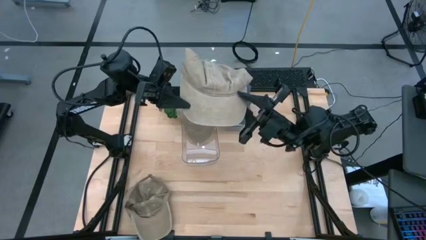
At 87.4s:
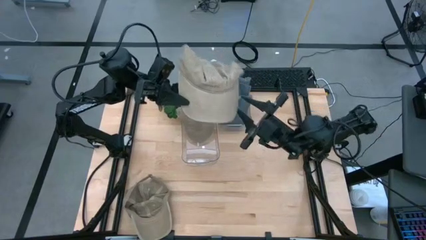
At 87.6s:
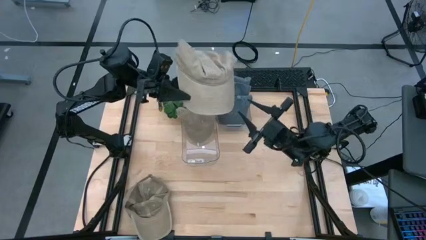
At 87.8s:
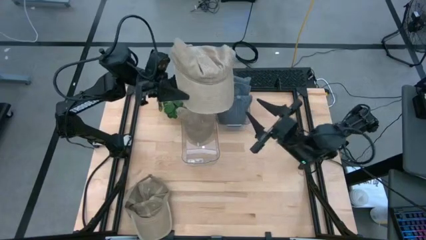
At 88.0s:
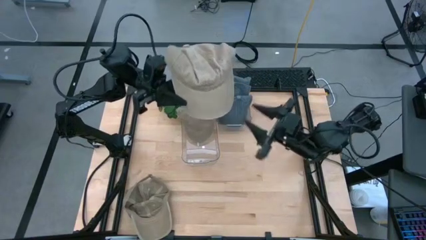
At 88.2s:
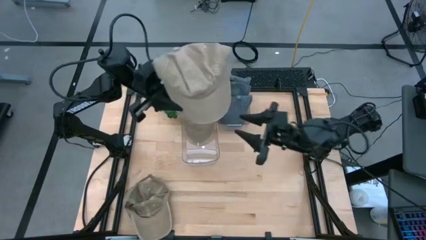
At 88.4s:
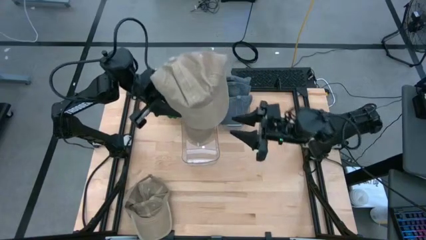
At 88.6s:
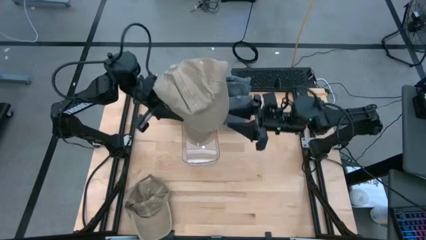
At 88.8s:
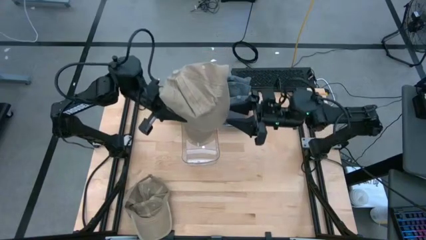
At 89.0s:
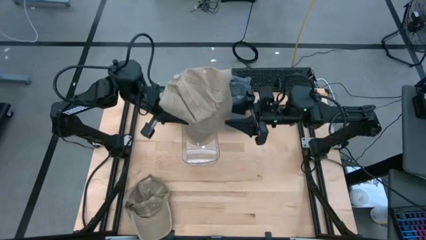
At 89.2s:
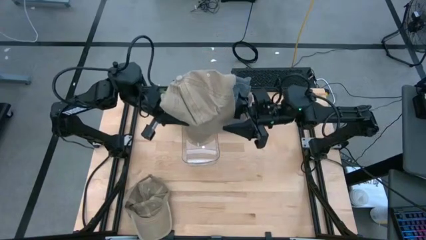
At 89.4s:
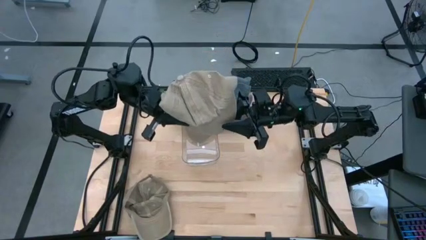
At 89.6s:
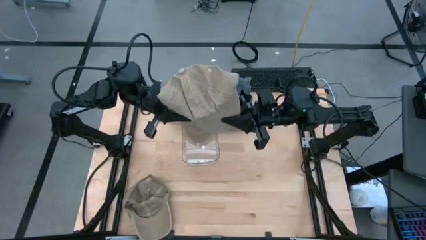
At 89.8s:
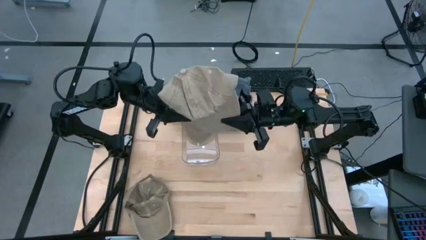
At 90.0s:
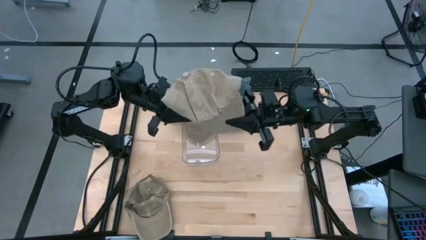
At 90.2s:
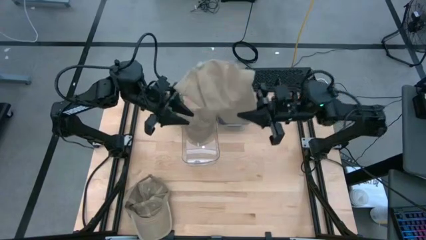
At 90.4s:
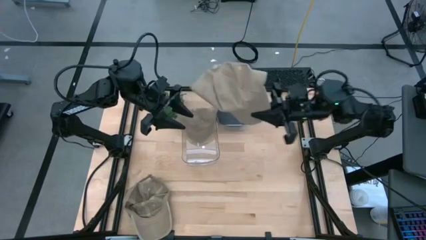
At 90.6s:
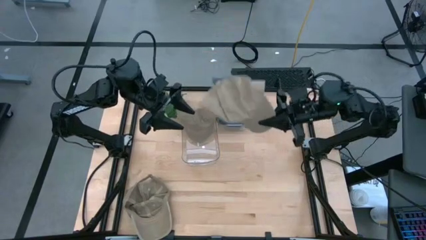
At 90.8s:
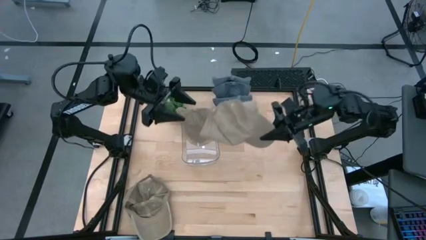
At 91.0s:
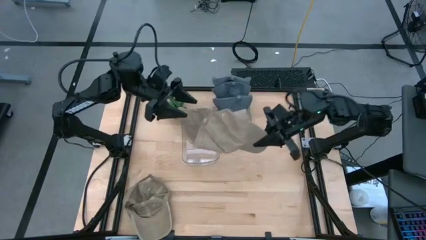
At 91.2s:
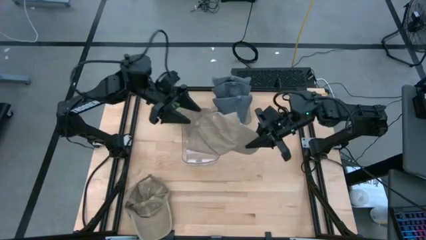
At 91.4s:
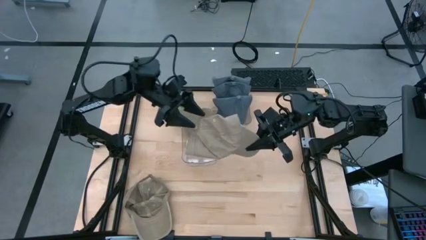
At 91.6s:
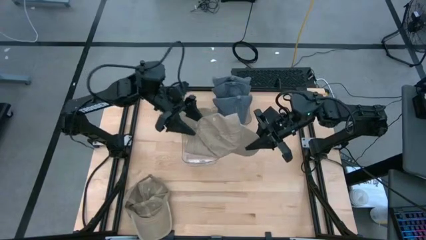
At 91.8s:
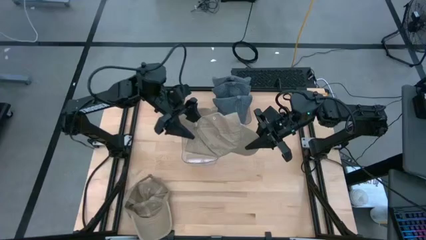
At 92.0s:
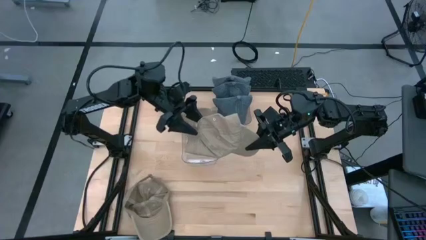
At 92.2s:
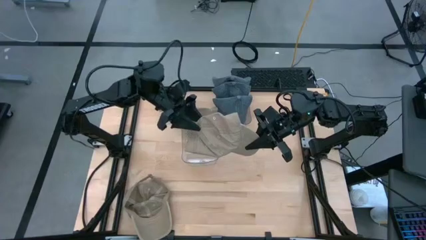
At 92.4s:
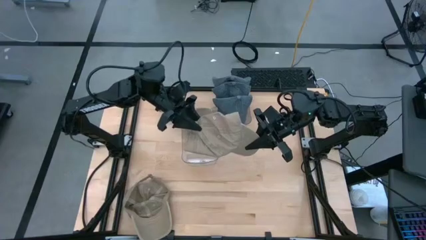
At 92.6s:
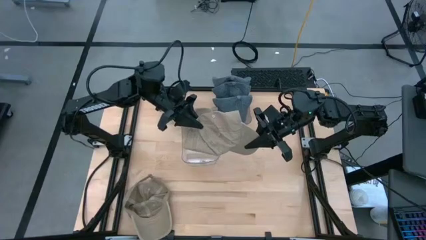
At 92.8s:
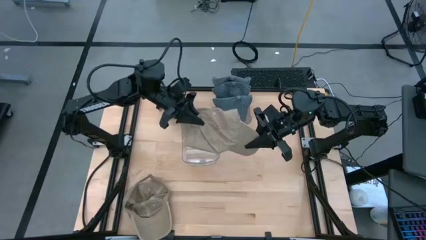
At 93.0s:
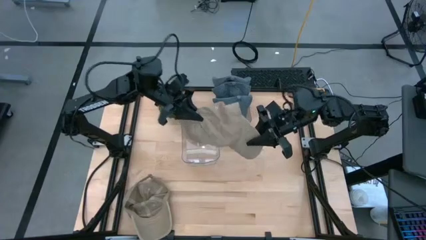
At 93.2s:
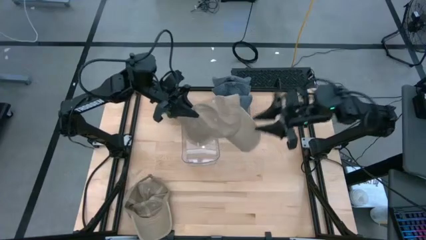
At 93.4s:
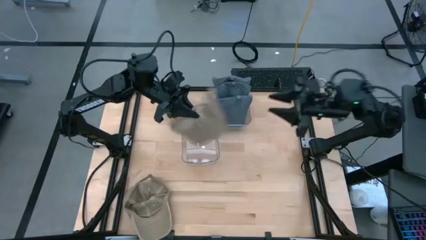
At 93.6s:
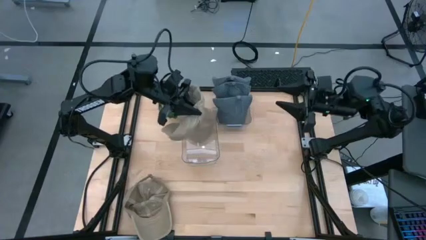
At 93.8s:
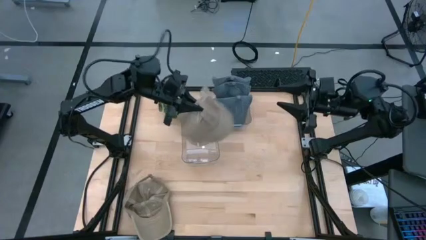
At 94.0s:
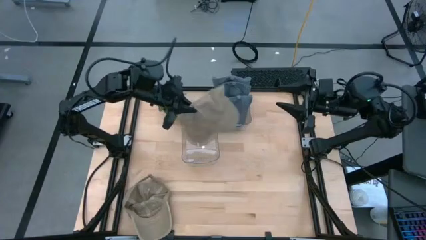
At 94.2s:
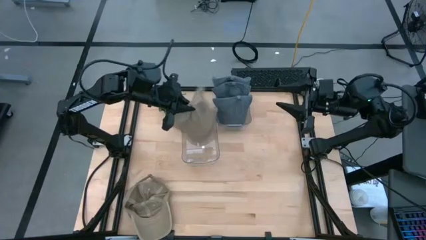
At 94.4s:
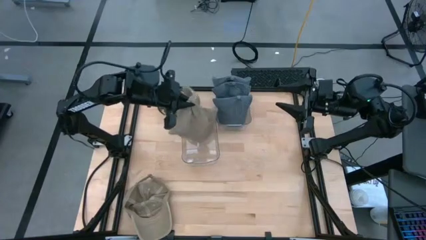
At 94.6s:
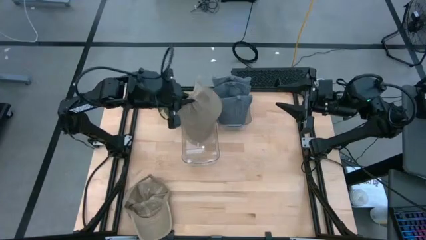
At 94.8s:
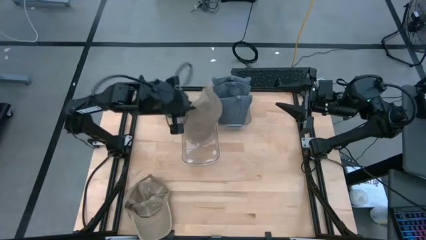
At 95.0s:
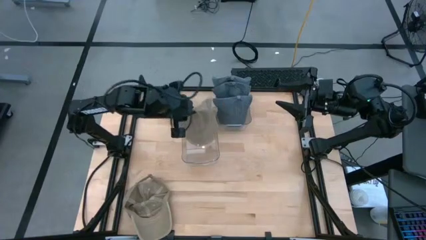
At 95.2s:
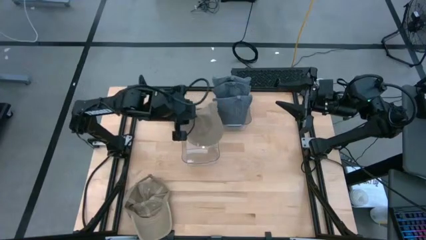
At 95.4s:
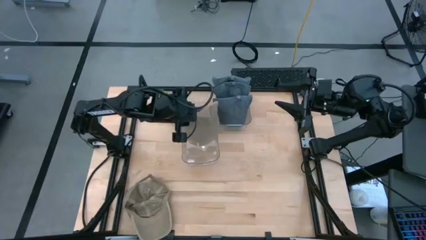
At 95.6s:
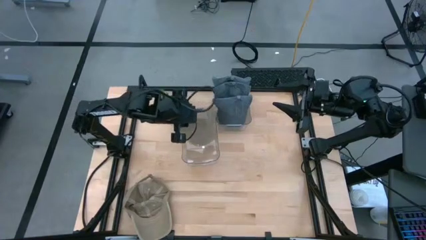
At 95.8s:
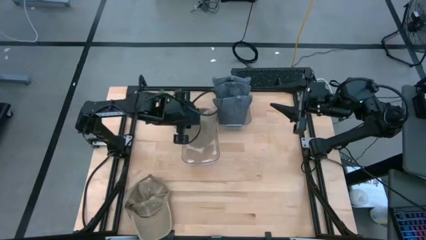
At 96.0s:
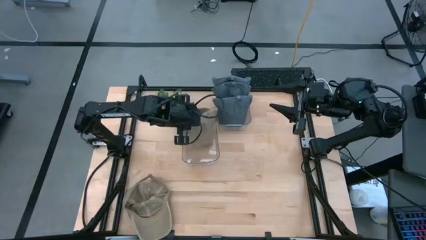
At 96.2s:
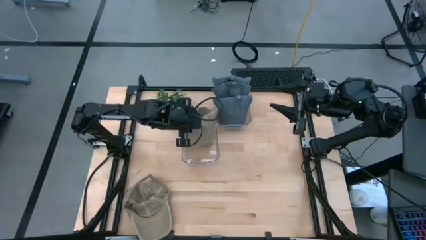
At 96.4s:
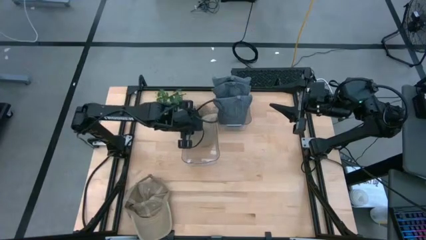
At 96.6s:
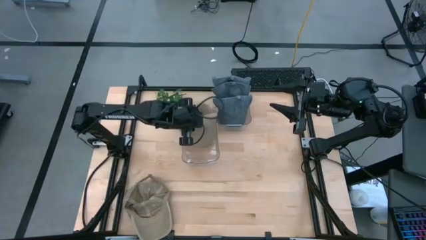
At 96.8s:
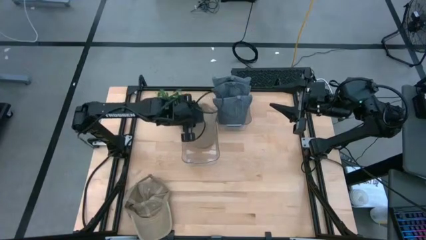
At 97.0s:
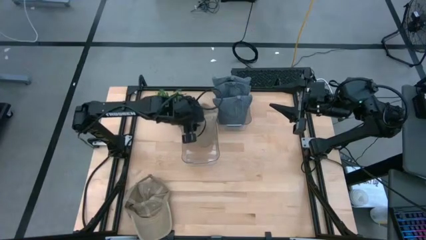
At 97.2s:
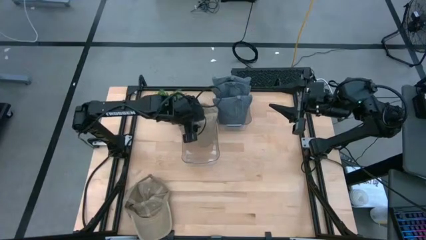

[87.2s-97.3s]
Task: Pick & Place hat
Put the right brown cap into the left transparent bin

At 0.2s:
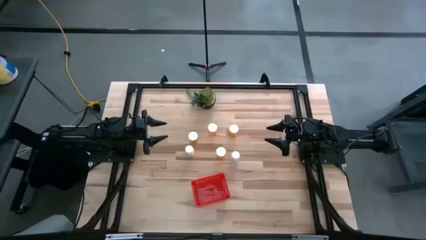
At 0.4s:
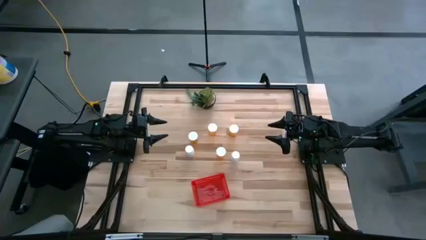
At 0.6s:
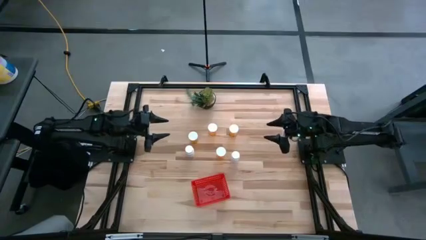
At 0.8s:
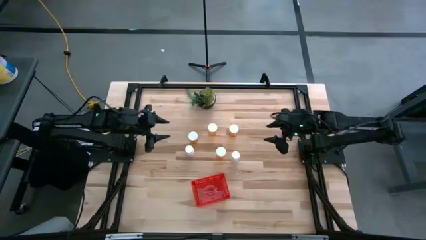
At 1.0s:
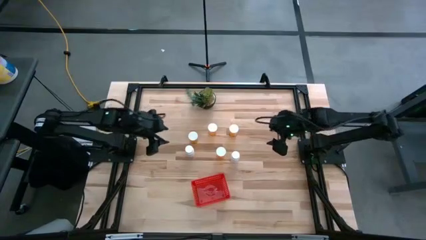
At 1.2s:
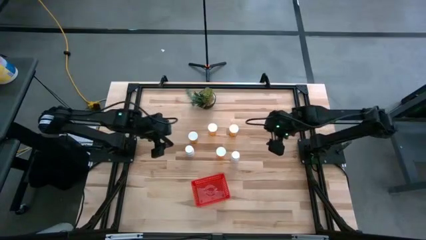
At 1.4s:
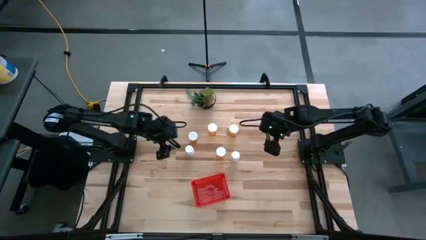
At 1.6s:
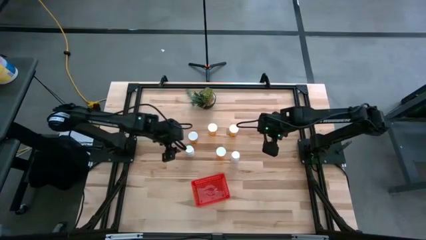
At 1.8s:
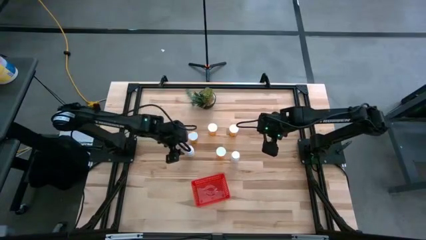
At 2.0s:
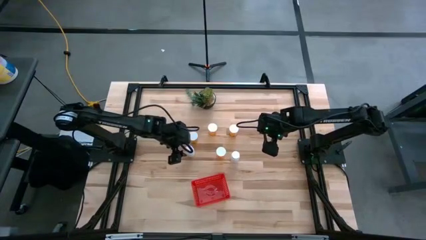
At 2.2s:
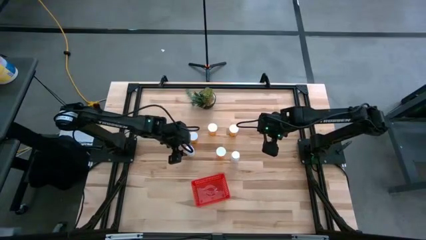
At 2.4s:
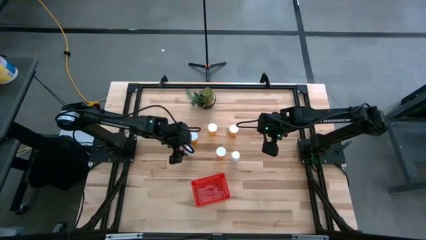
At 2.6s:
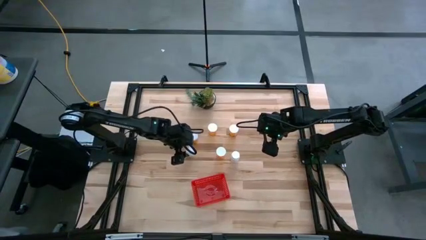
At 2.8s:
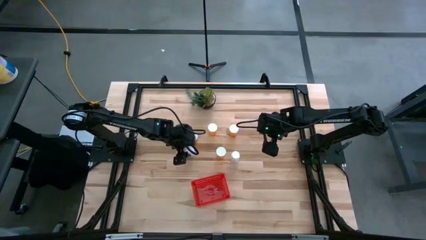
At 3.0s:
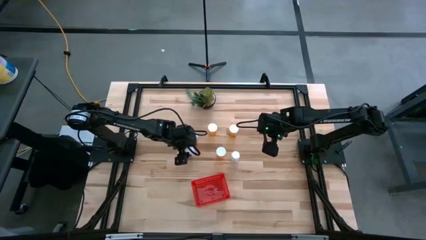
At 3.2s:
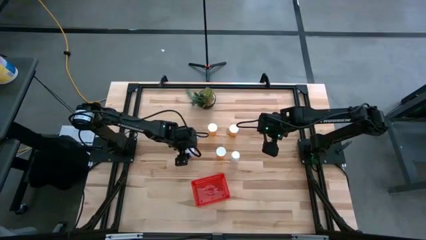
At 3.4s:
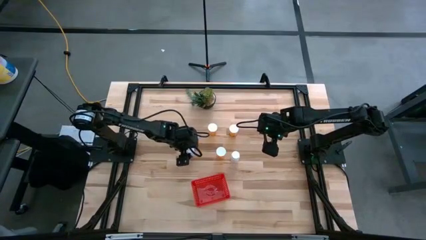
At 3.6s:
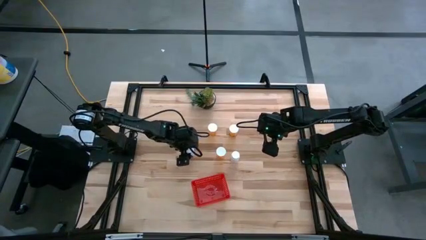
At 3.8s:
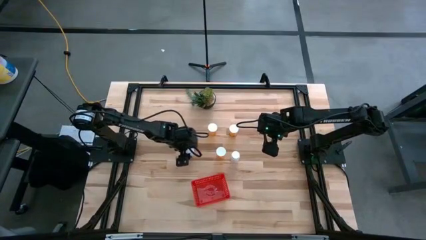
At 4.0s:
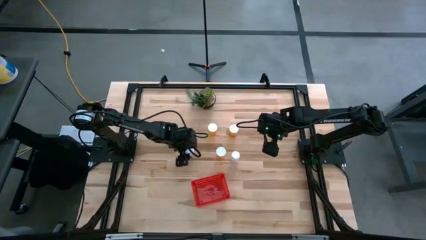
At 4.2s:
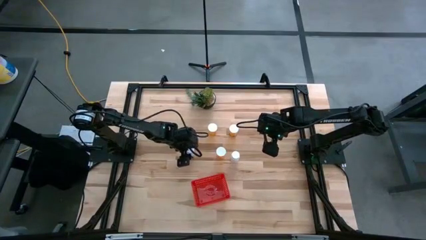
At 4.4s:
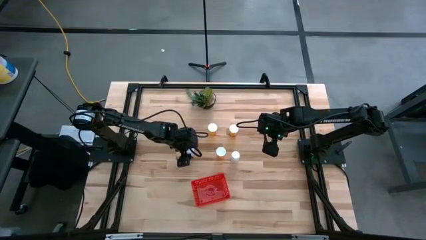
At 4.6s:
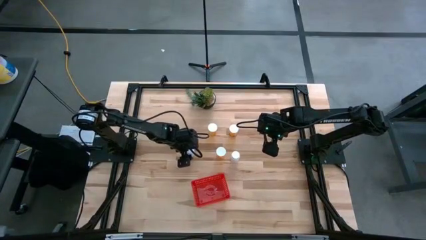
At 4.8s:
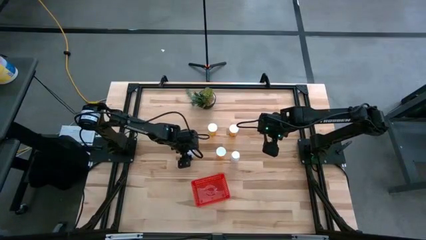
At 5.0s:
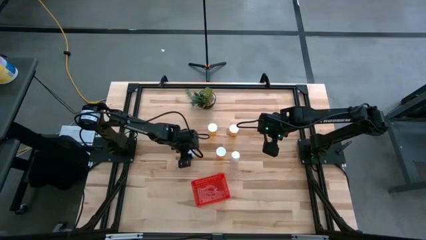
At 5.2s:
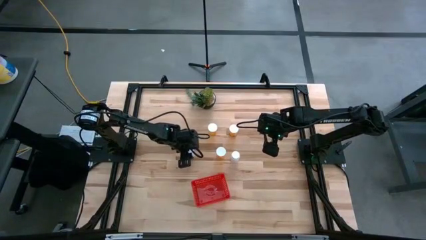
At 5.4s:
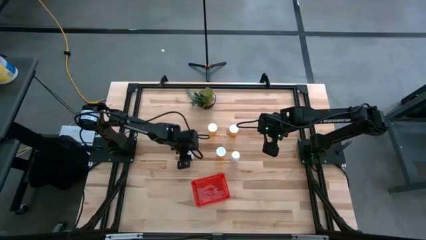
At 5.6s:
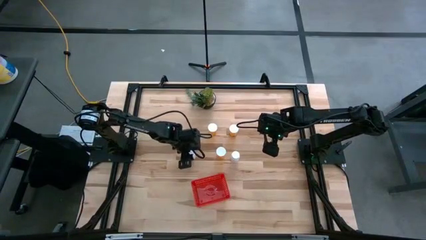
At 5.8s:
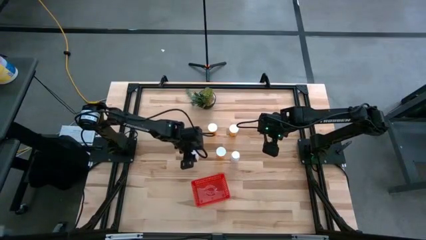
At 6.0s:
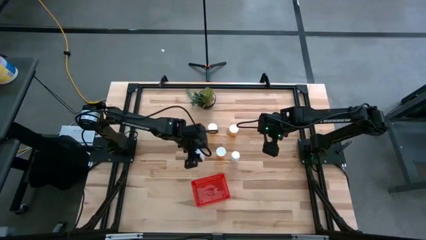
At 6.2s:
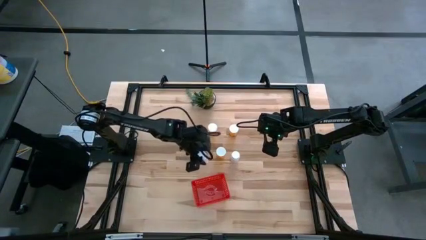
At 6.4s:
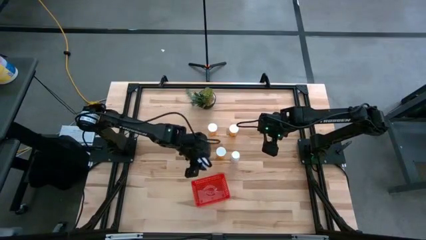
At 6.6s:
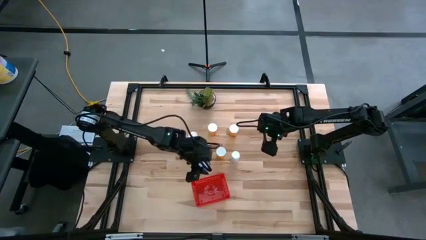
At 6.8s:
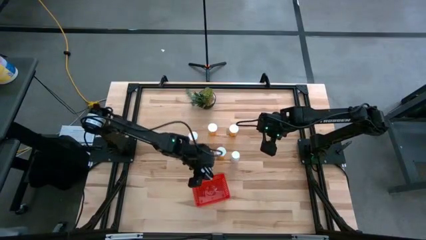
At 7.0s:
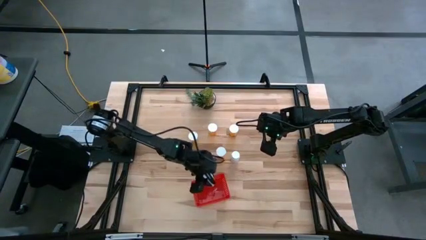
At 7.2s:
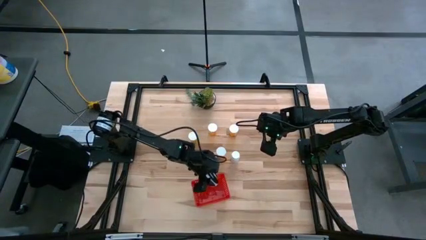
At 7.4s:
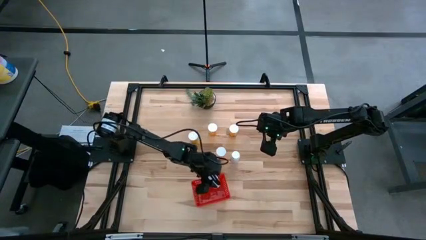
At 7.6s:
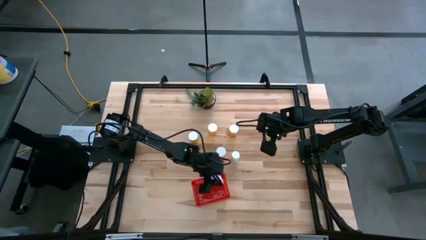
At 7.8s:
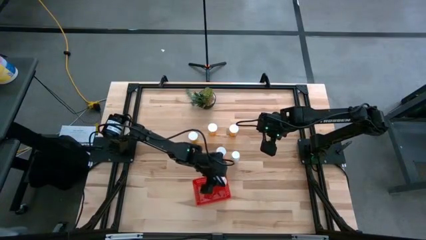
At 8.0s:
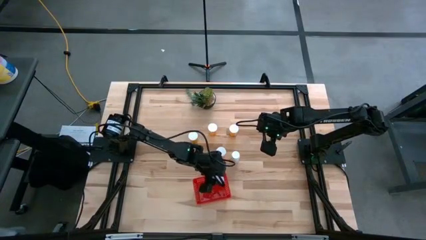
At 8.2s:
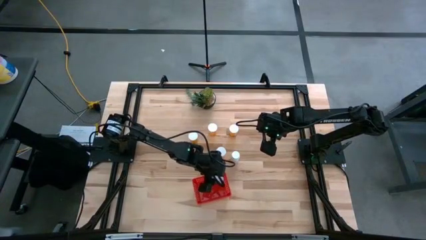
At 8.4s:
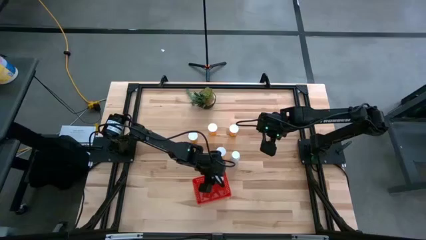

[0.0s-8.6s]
Task: Pick and place pill bottles into a basket
Put the left white bottle into the basket
